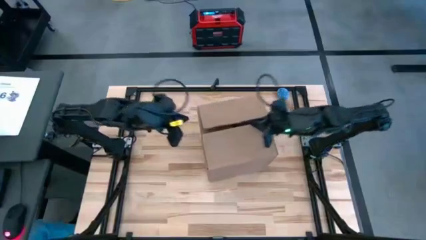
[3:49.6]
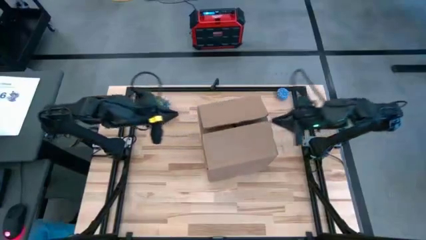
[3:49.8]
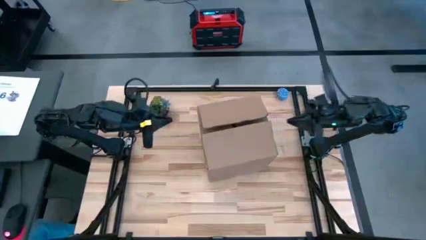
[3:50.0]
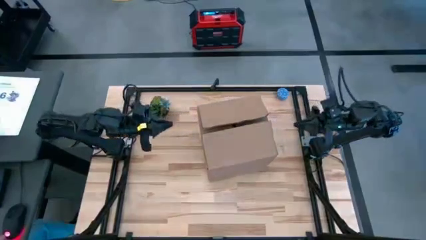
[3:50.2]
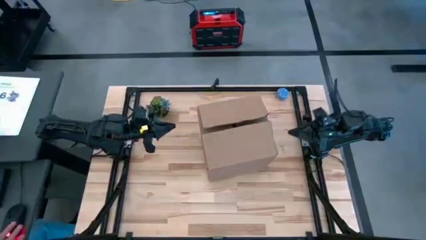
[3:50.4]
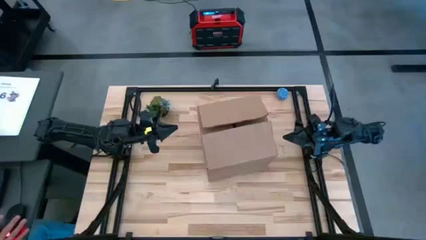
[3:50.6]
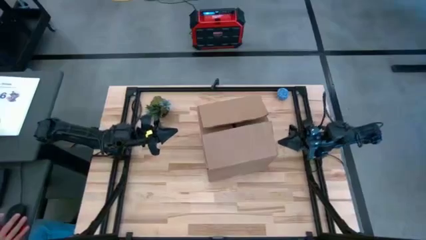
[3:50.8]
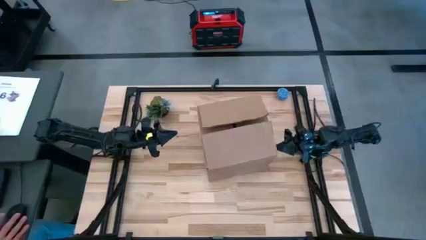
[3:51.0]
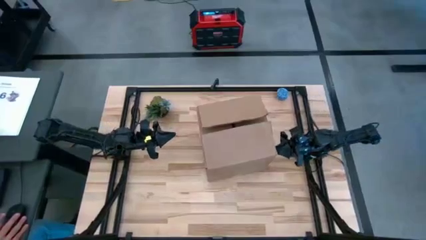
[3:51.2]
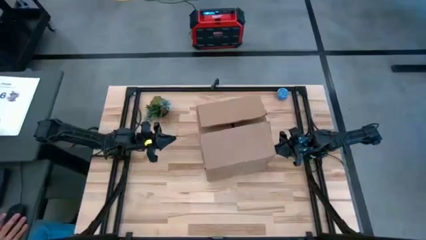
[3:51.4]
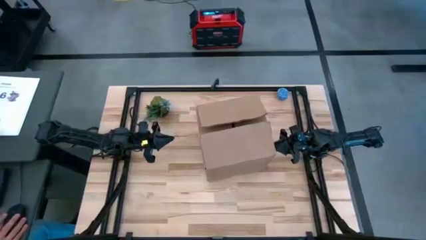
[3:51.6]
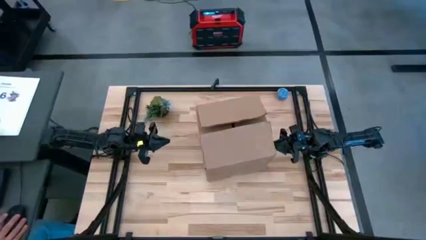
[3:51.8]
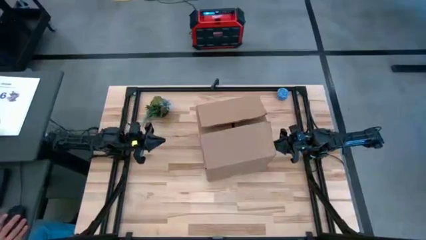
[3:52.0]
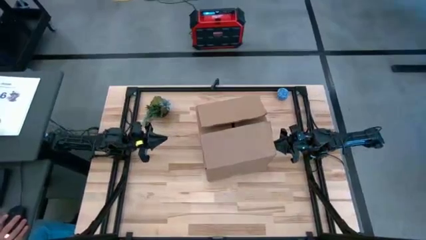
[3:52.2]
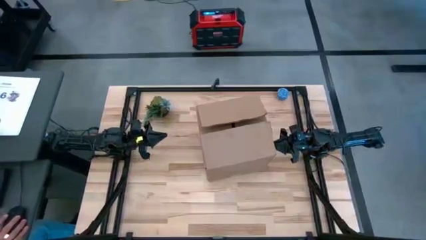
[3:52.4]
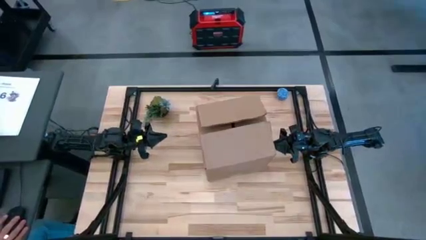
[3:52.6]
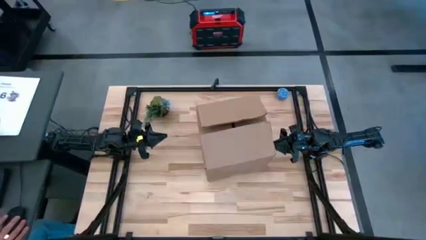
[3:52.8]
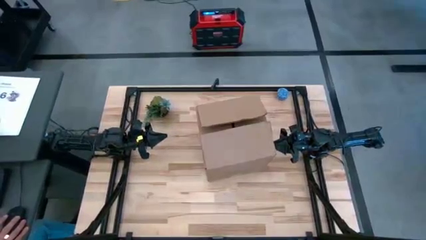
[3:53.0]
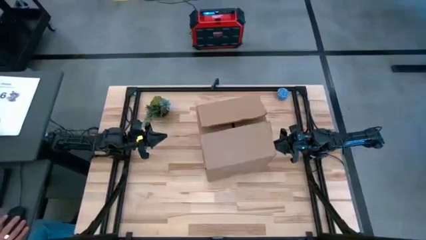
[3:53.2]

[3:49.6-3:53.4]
Task: wrap mug
Return to Home Position

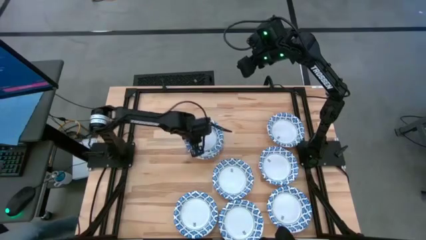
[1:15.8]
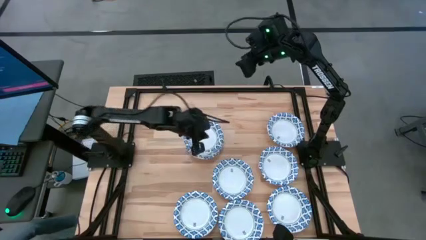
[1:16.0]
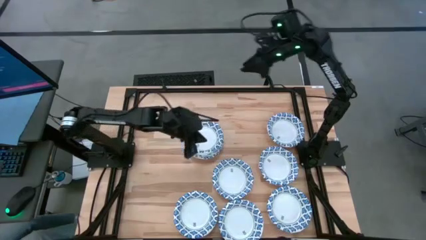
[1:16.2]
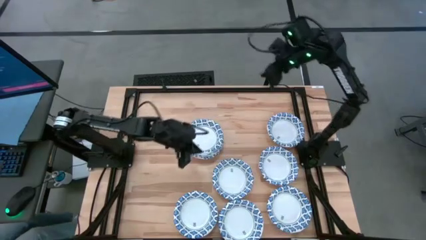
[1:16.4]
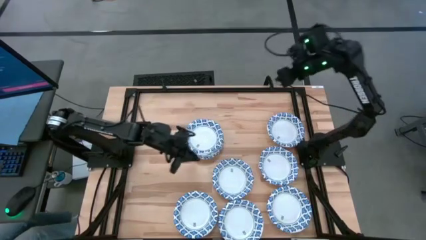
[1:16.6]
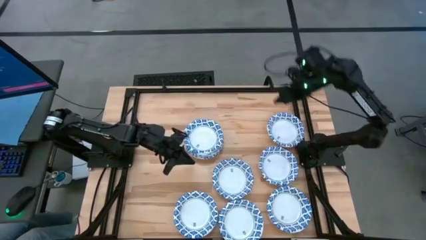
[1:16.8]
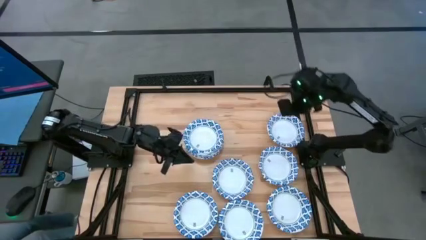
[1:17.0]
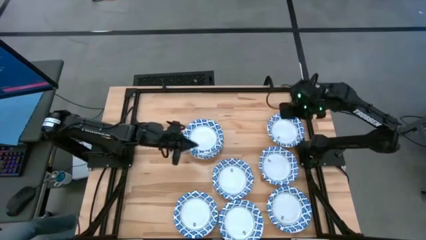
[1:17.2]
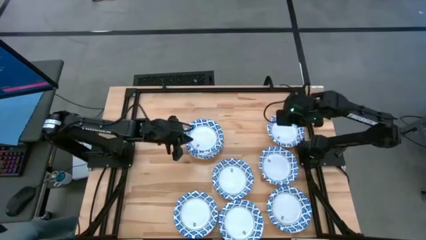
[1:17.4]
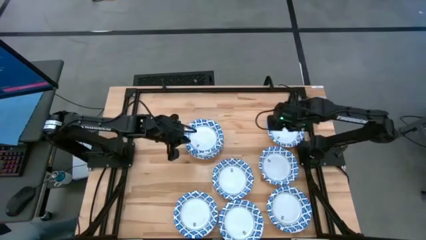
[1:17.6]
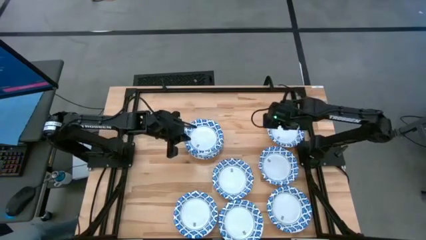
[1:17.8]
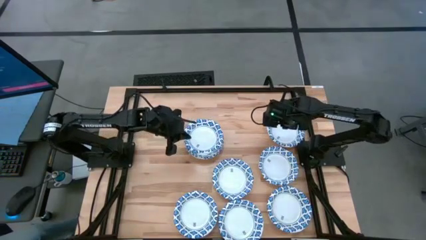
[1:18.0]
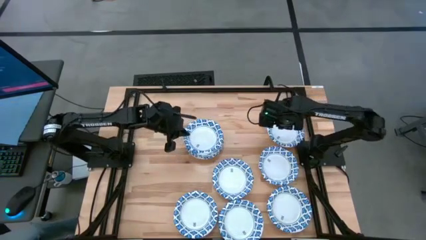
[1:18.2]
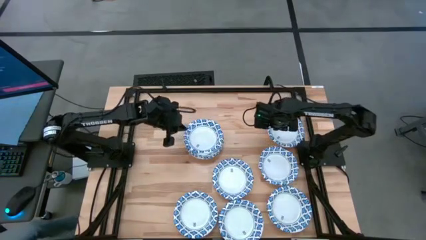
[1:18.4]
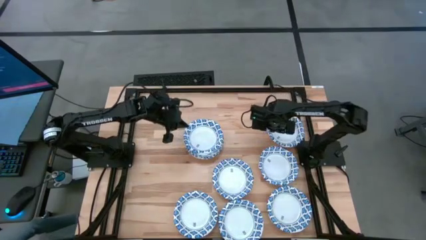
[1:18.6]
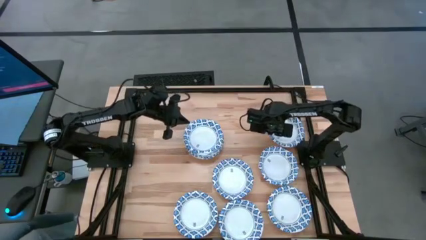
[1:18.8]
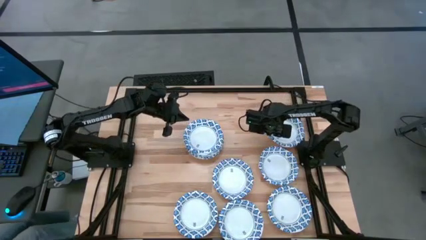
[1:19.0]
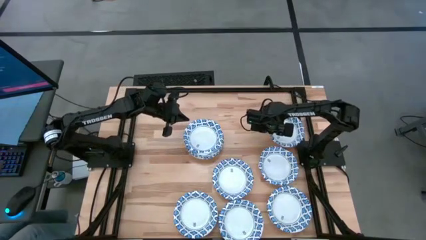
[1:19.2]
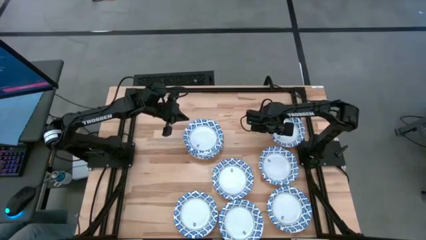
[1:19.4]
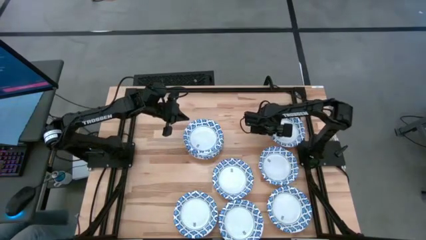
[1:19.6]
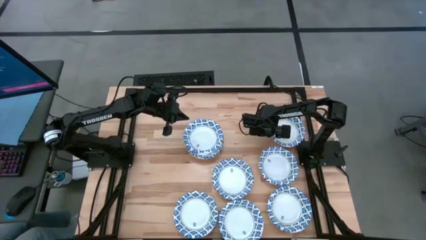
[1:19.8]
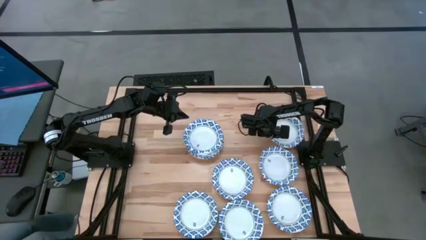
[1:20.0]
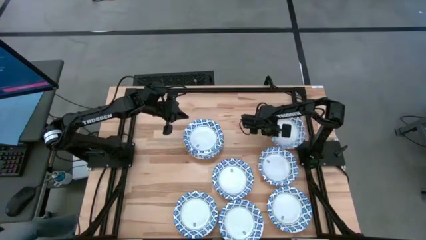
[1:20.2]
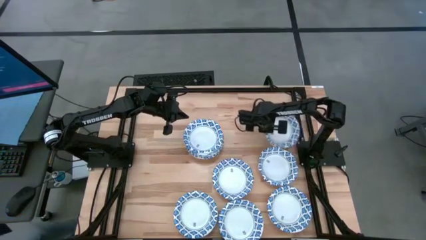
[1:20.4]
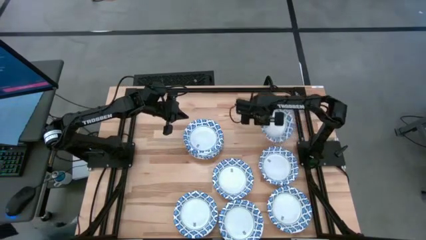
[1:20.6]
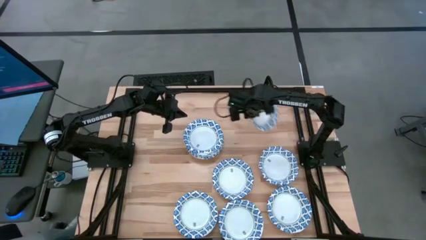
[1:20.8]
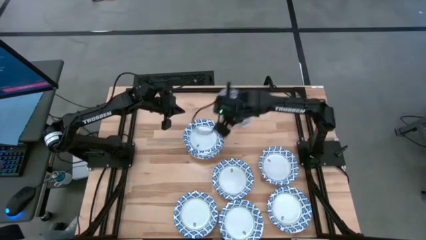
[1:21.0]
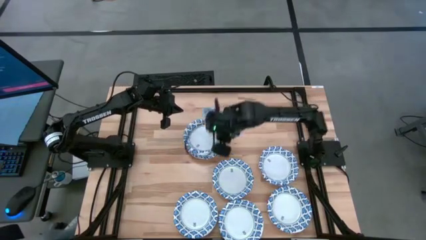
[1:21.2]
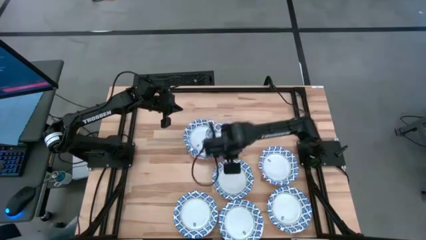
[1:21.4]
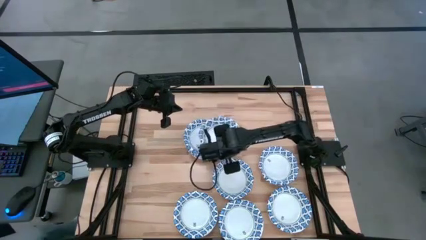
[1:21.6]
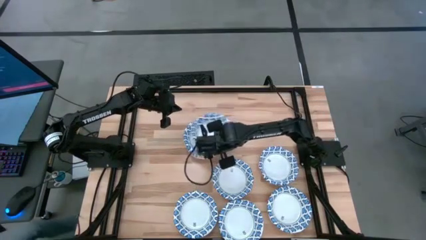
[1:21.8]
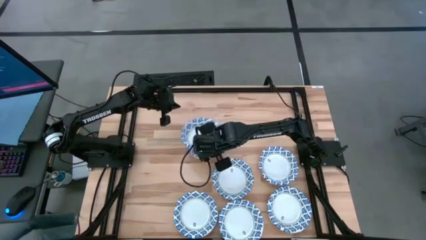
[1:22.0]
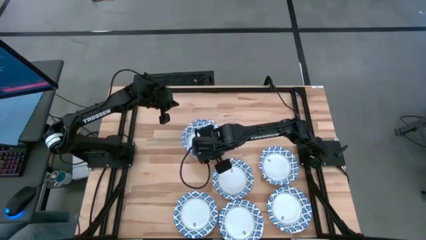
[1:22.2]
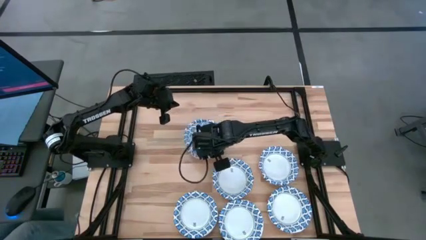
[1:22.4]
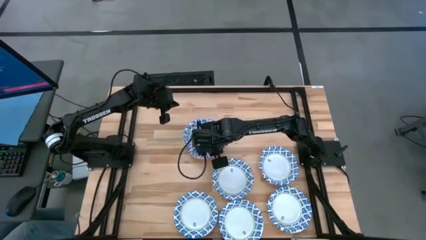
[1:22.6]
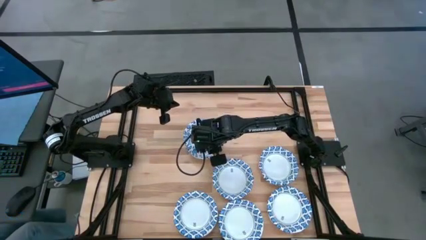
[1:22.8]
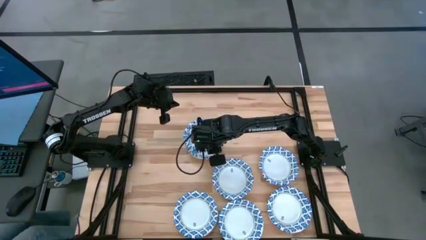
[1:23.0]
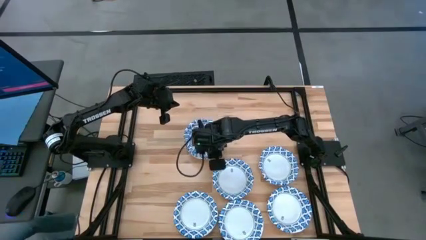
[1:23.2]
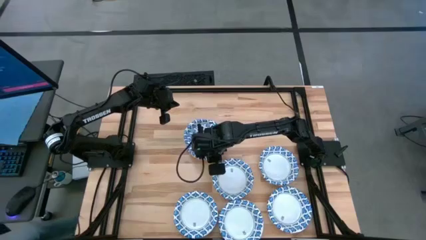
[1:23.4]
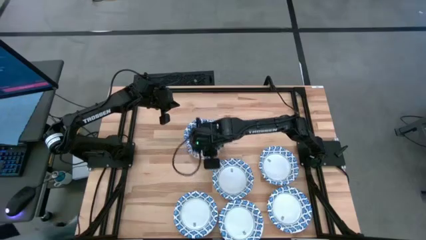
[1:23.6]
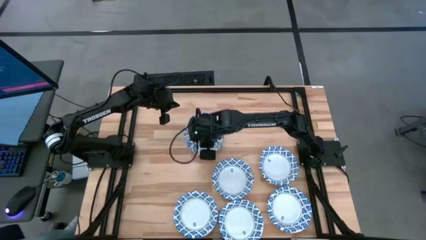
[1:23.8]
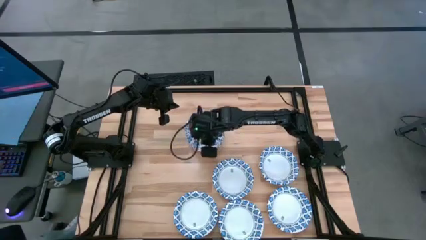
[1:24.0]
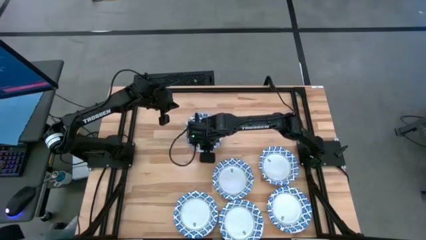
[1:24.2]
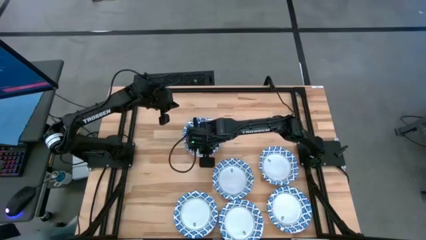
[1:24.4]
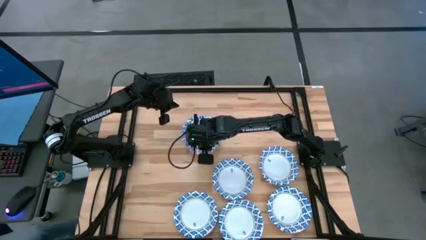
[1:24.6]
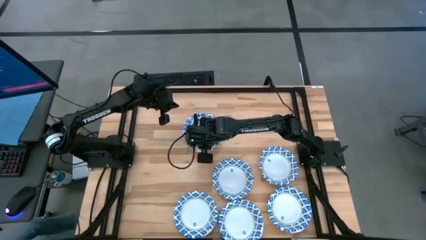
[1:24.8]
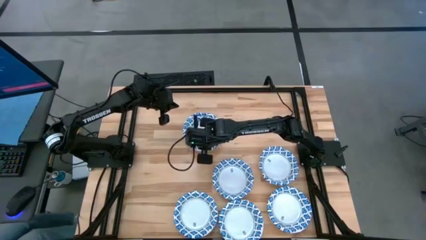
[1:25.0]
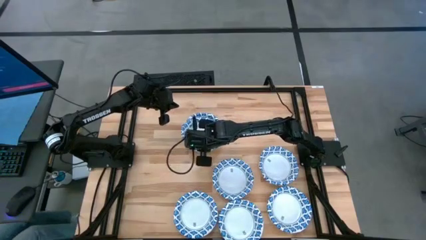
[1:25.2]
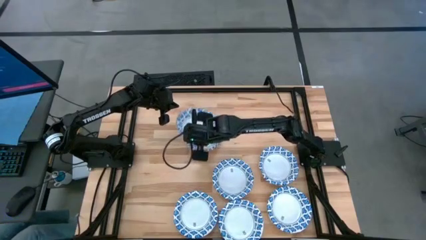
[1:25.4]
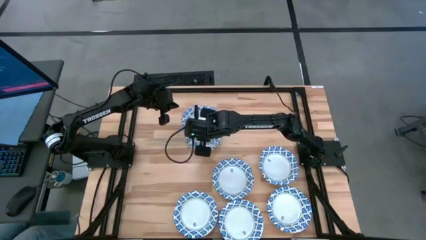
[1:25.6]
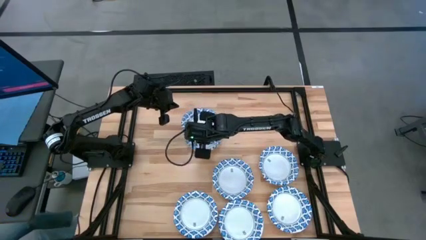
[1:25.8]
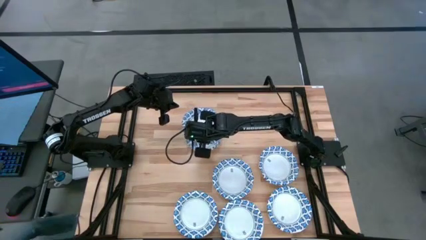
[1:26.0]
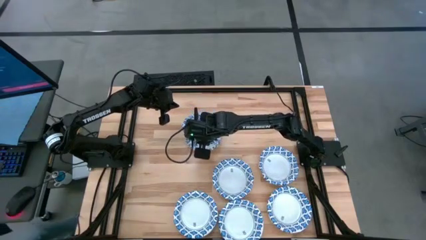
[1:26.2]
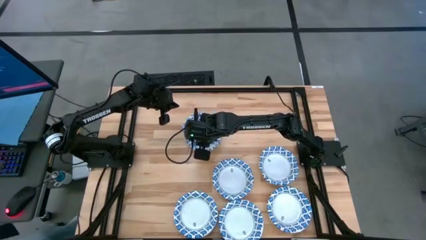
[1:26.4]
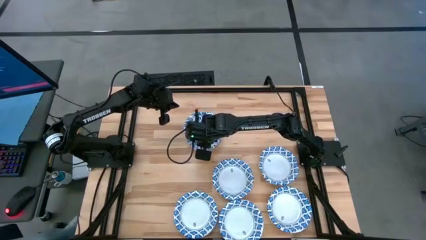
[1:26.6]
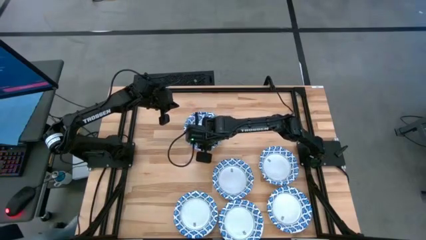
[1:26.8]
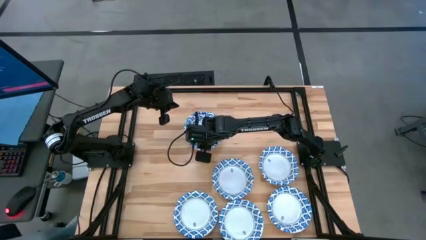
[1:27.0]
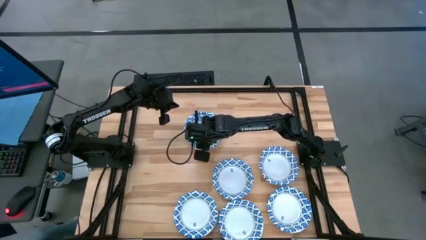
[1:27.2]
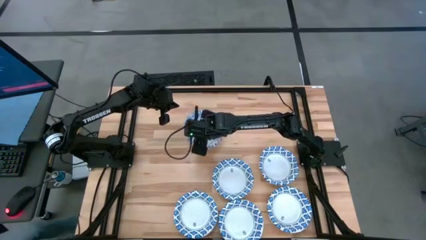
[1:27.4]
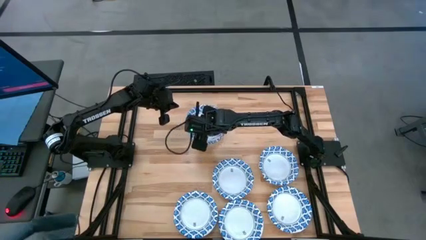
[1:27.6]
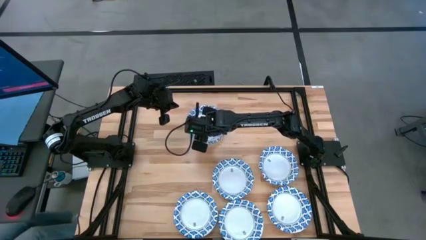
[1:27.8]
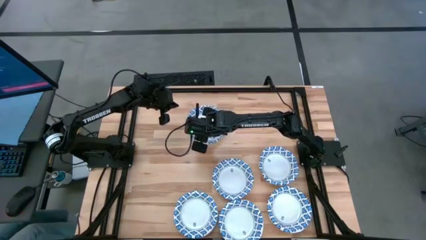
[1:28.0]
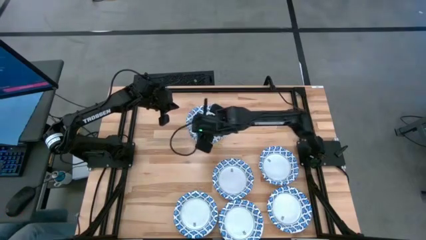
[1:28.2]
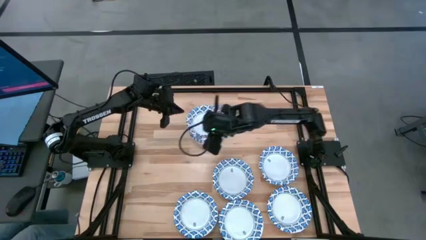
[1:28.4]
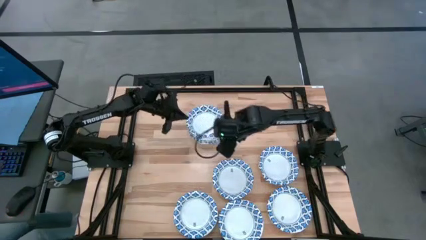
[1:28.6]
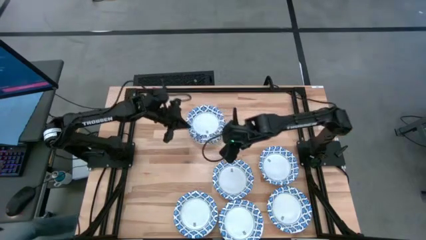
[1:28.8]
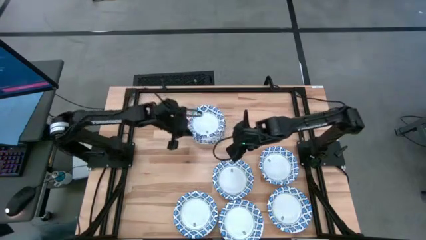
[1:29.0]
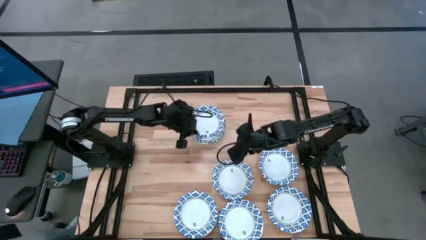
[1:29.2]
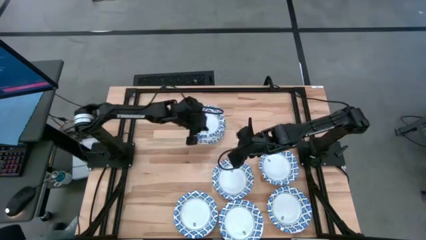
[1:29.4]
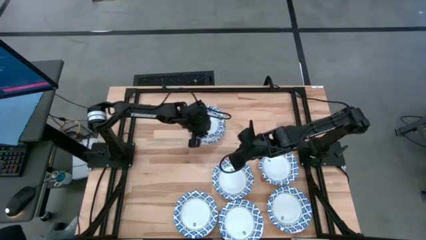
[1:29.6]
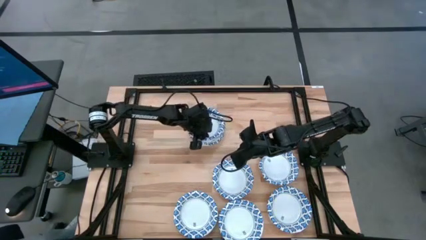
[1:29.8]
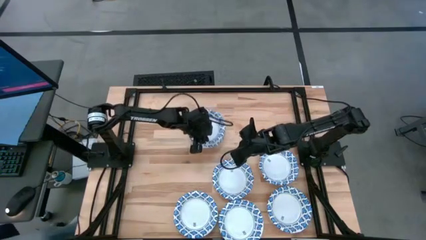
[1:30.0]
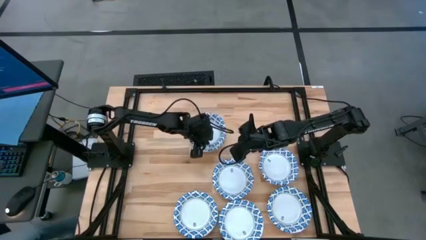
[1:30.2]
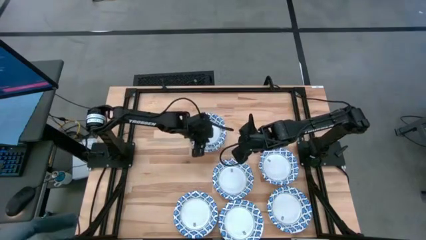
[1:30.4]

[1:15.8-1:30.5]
Task: Nest bowls inside each other
Stack the blue bowl on top of the blue bowls
